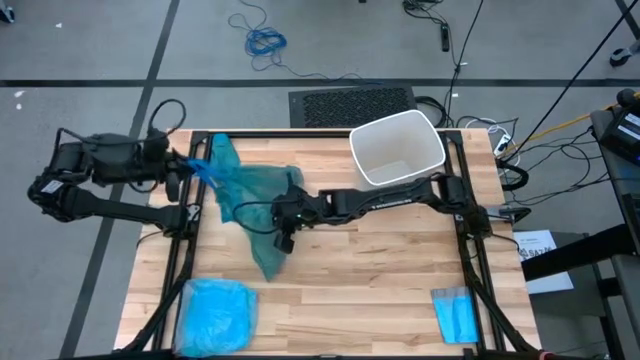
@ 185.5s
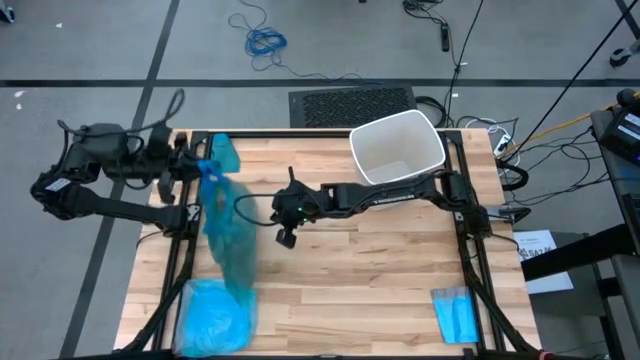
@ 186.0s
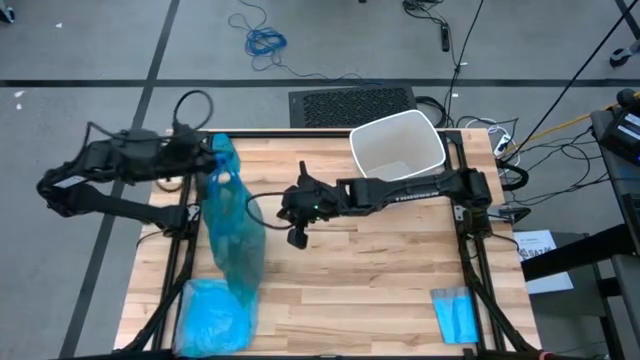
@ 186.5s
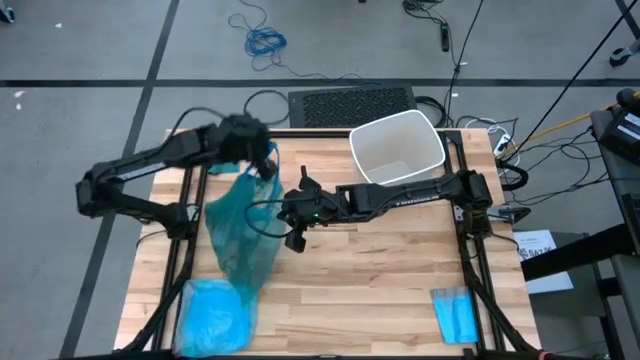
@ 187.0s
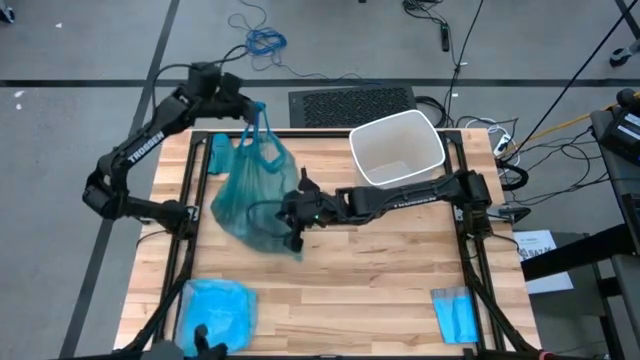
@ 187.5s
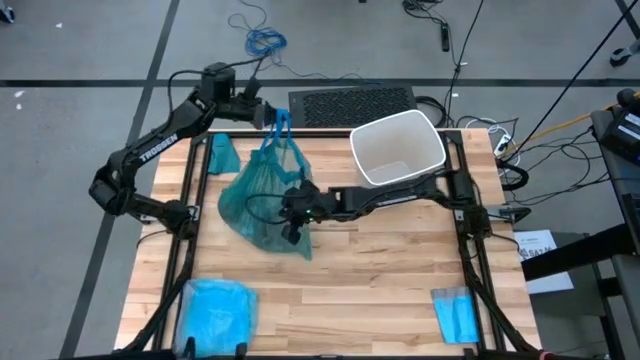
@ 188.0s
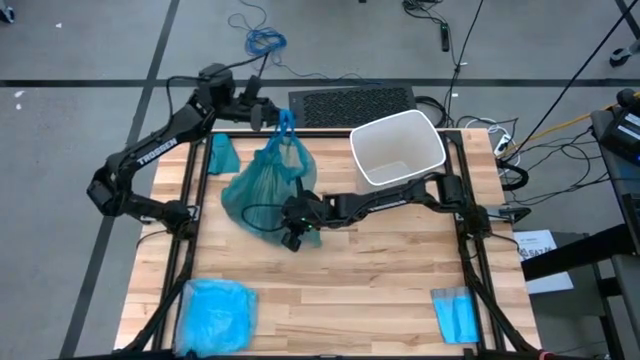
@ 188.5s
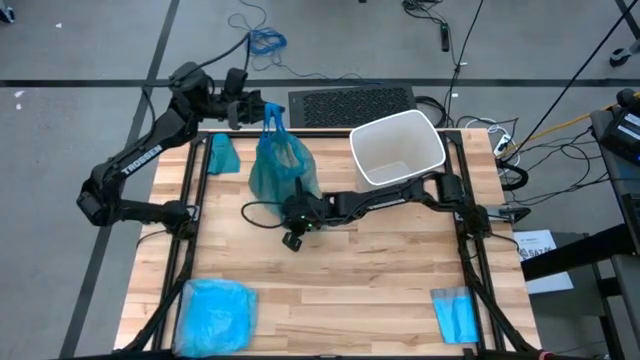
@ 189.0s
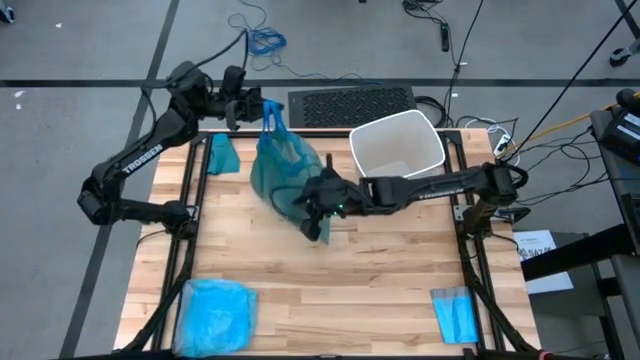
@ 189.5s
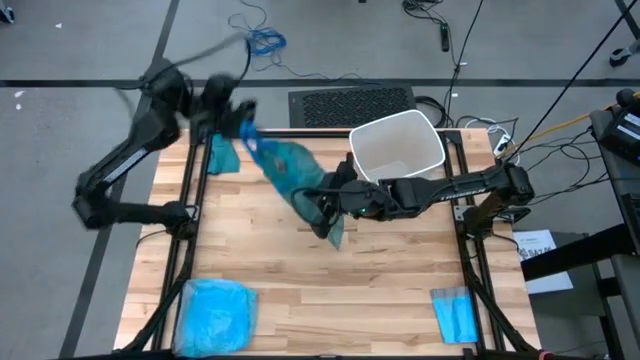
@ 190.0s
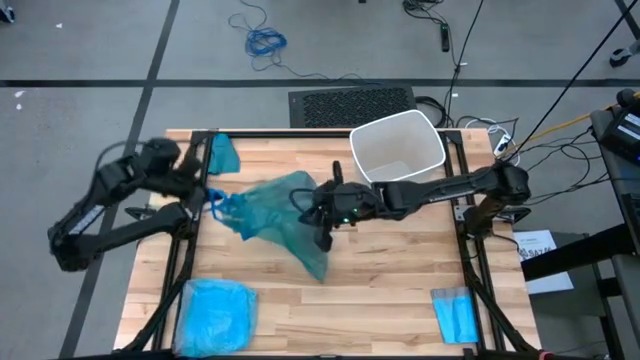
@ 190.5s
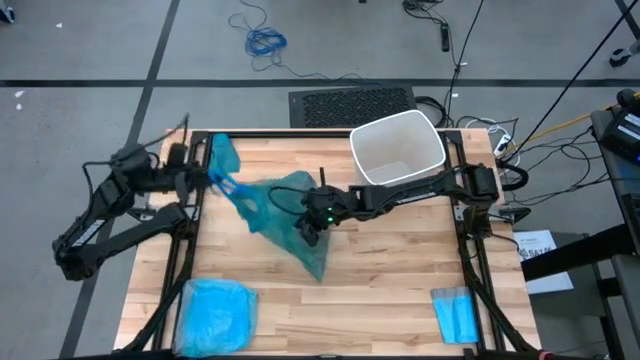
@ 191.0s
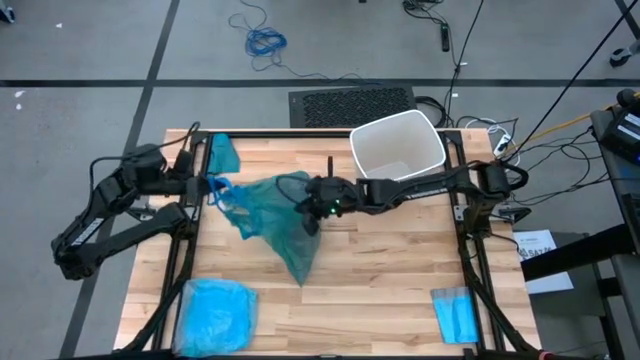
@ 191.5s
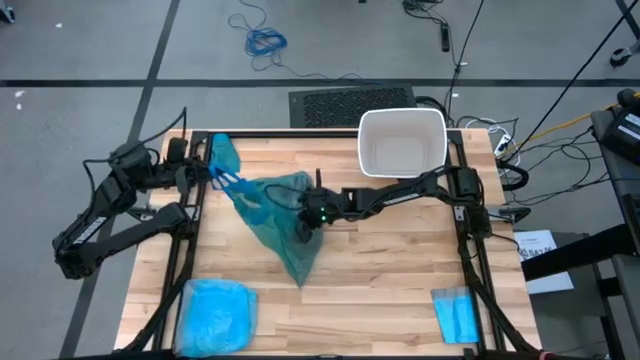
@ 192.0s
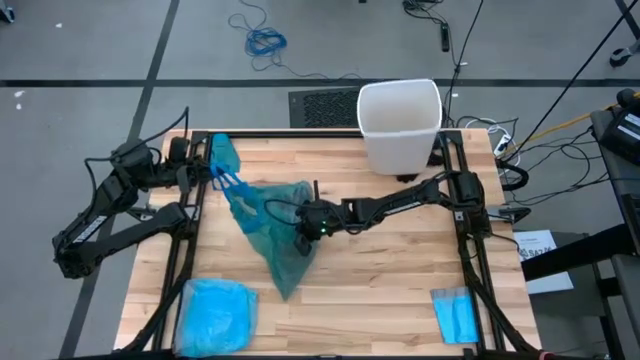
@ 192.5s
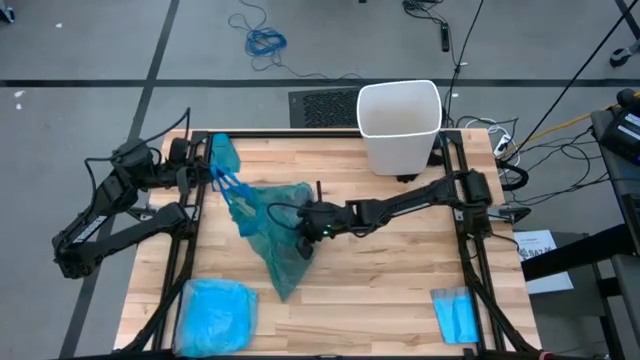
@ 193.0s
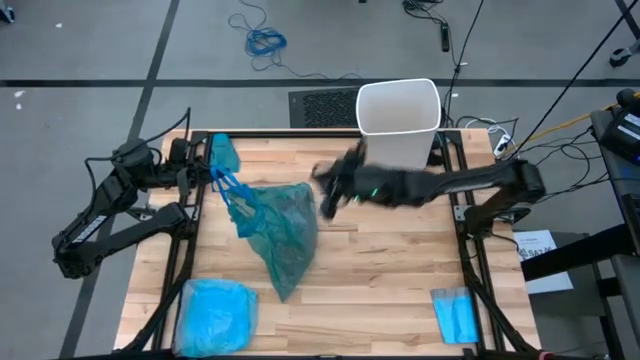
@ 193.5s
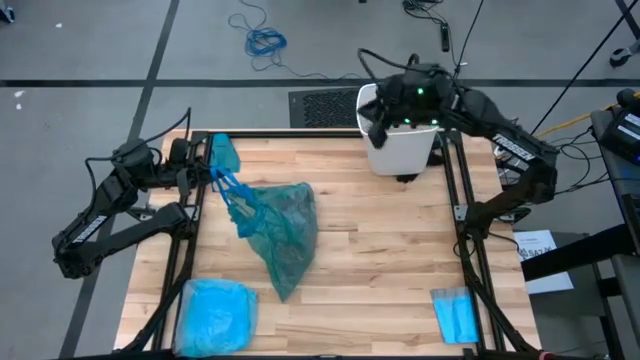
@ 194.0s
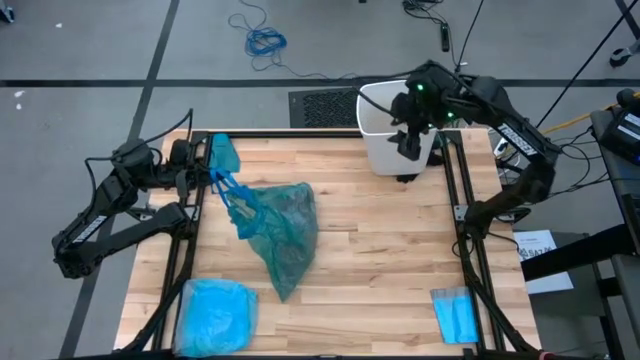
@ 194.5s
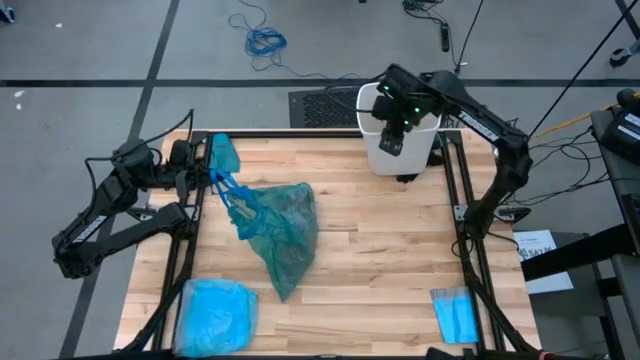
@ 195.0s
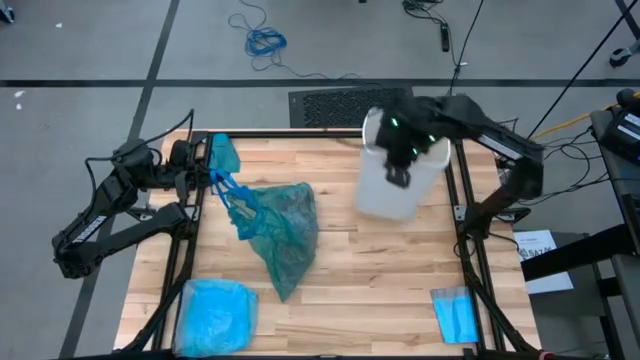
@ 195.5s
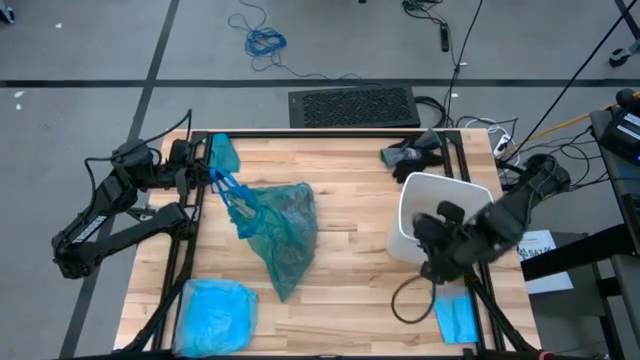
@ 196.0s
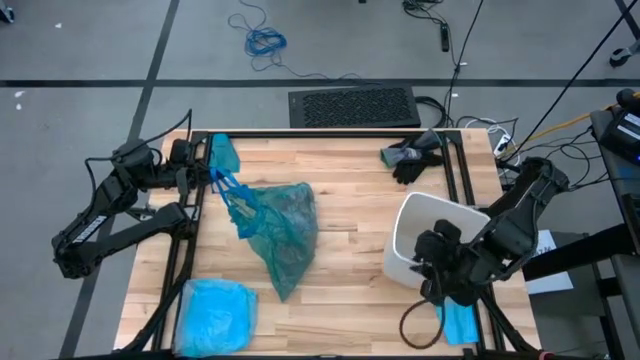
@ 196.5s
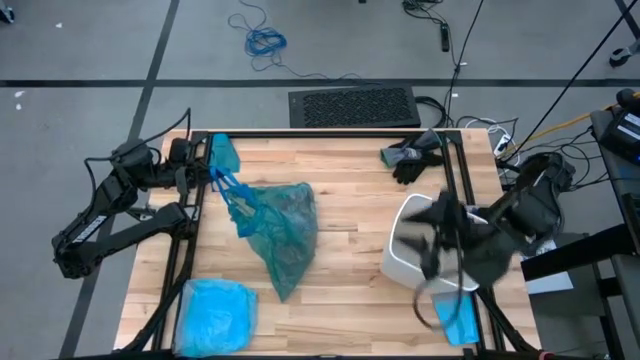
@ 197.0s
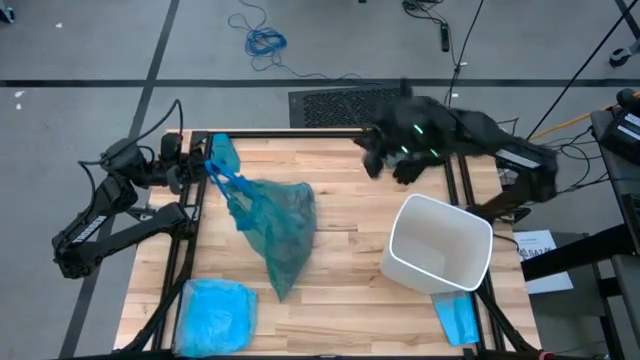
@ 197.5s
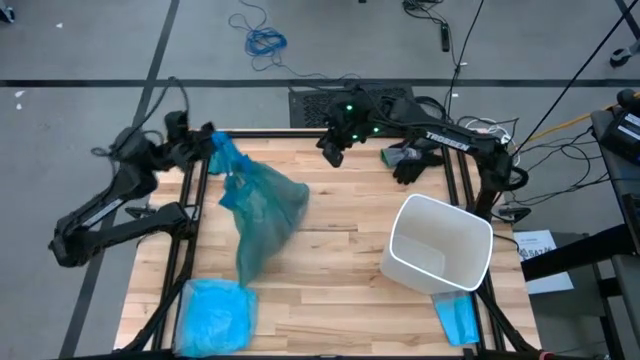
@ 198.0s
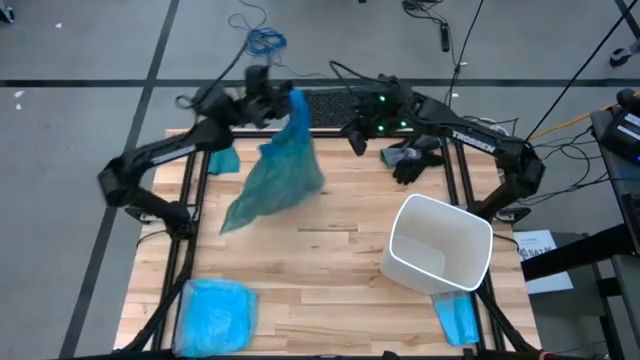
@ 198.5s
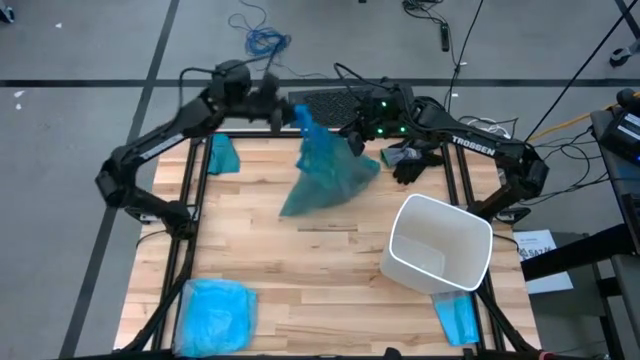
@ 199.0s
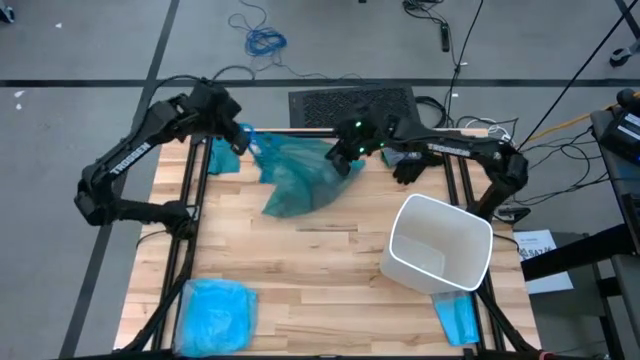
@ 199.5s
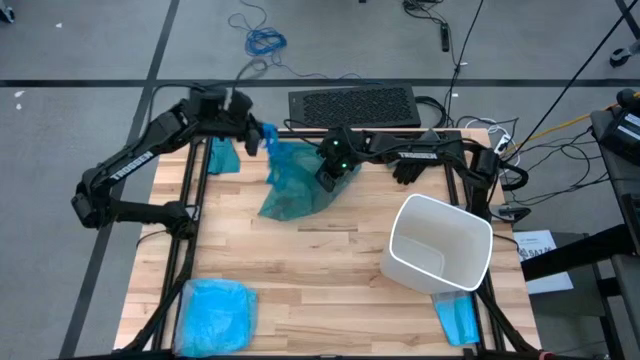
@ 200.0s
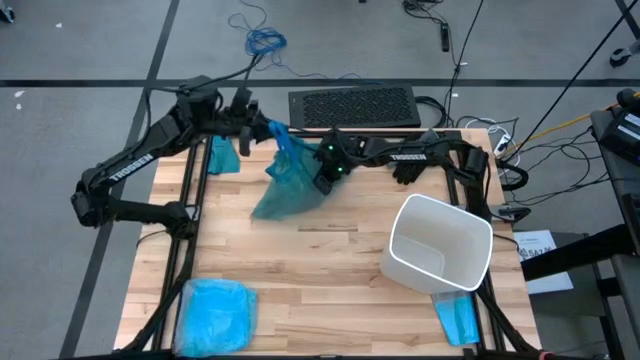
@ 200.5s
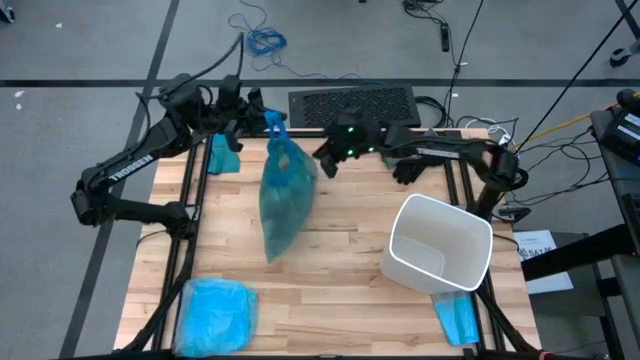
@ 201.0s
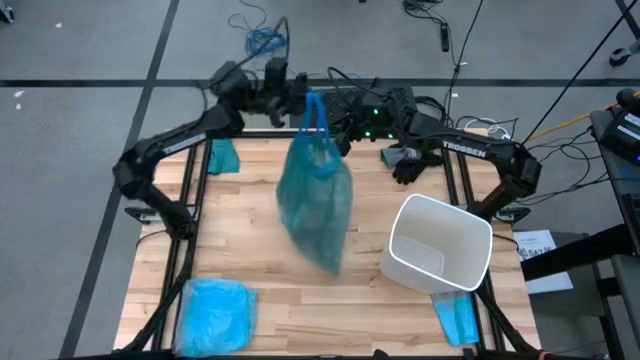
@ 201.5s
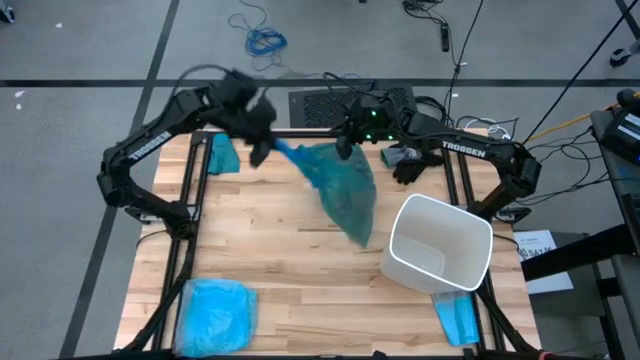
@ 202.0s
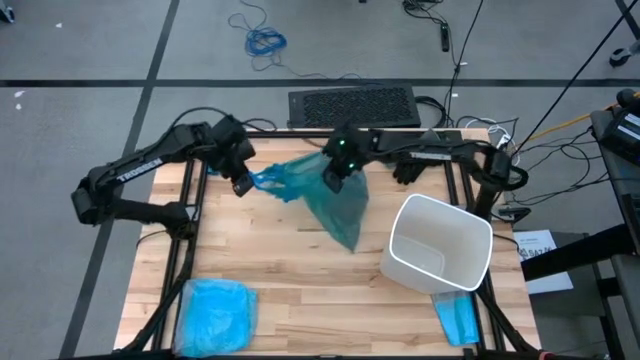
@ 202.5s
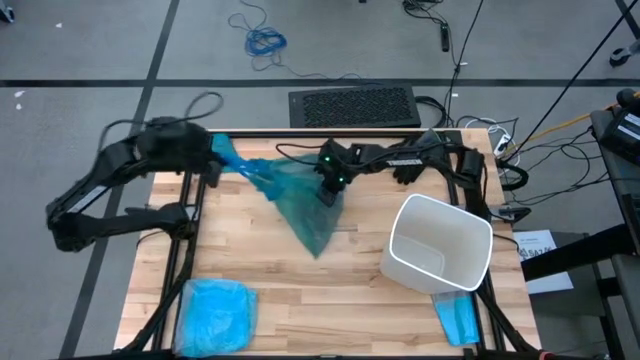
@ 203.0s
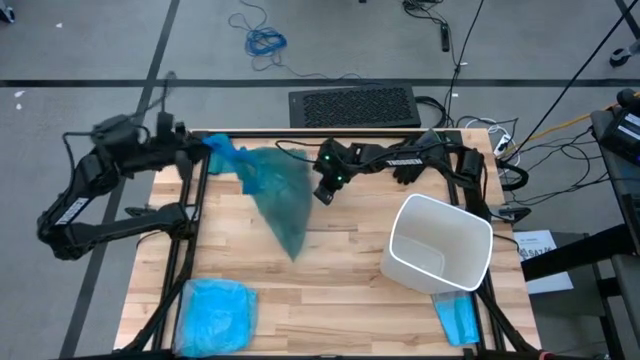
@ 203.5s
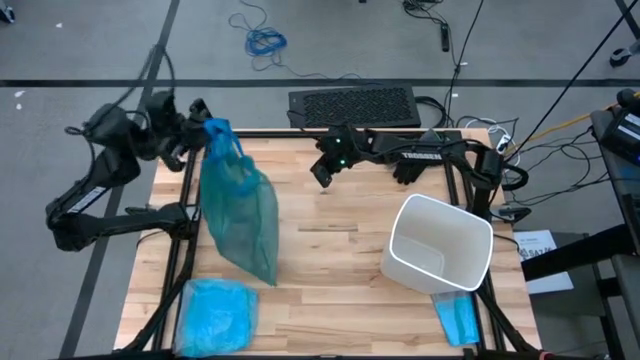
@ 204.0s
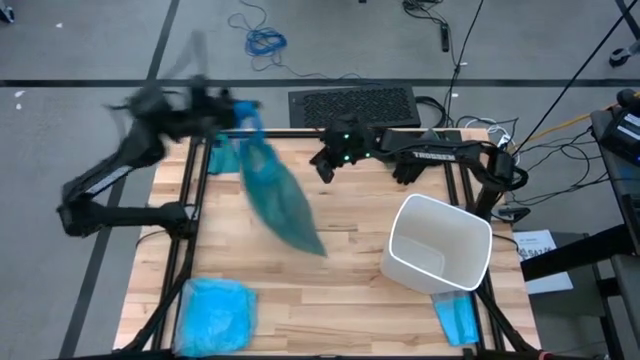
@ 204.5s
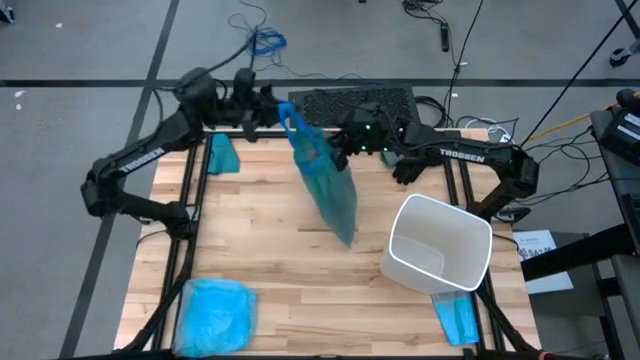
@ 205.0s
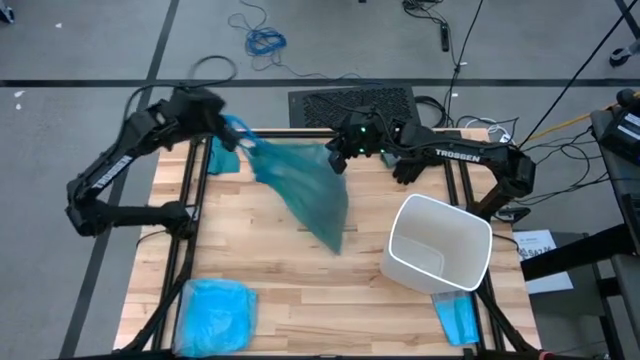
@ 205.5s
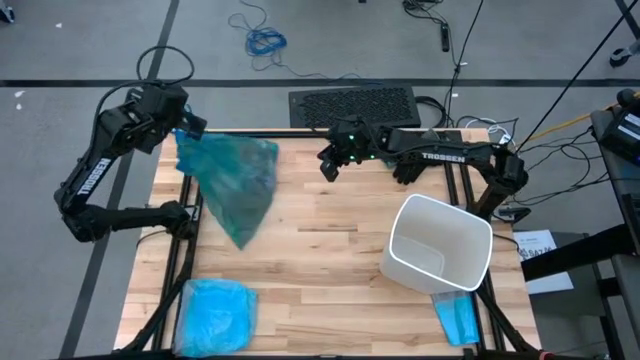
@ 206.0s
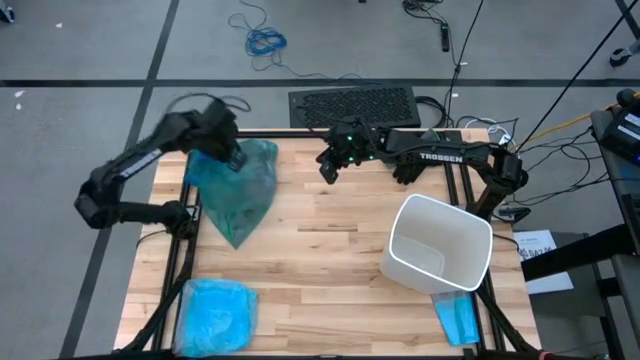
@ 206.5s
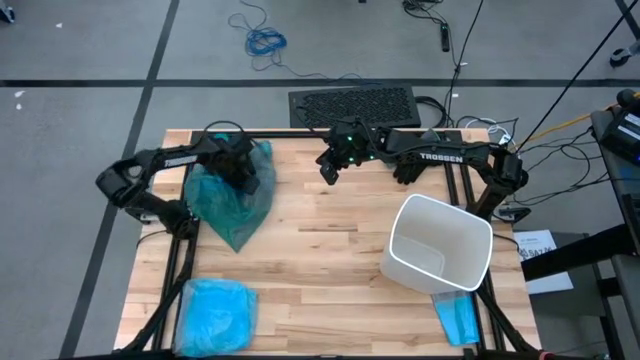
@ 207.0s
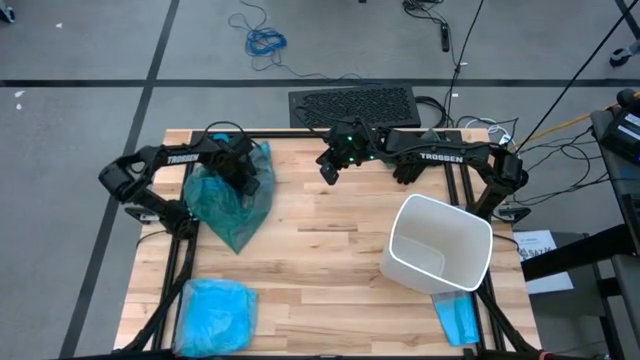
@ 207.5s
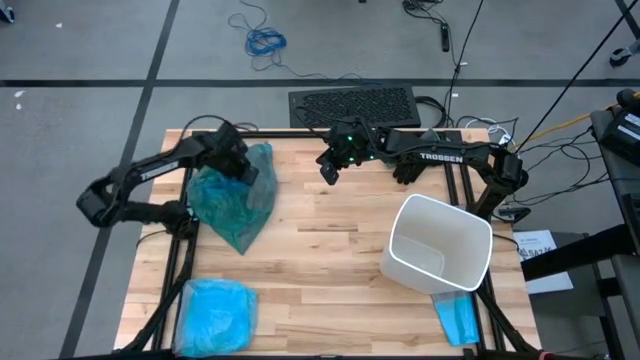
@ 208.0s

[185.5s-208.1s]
Task: place trash/remove bag and relplace
Close the blue trash bag
